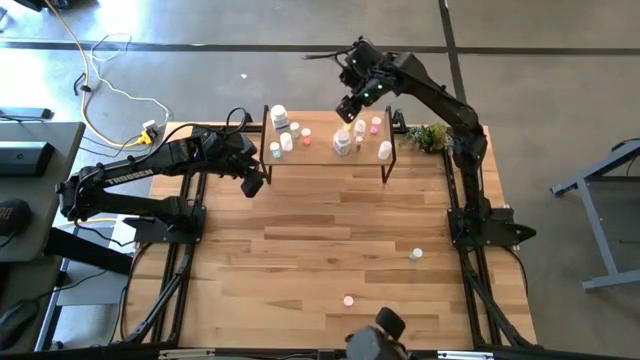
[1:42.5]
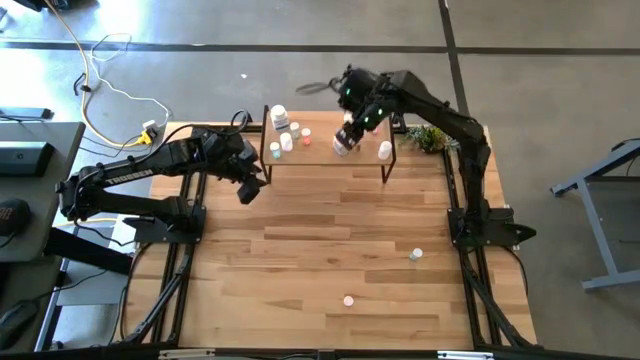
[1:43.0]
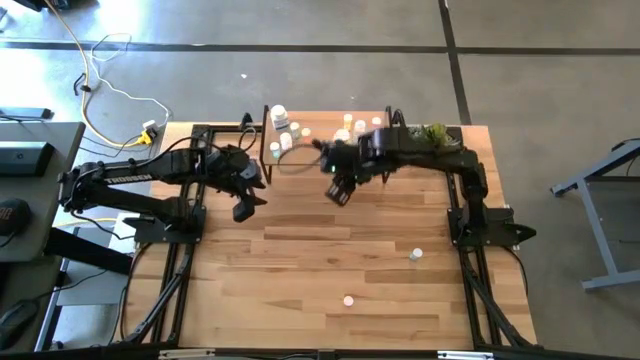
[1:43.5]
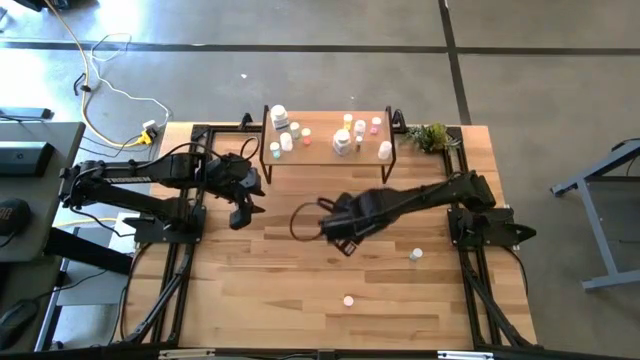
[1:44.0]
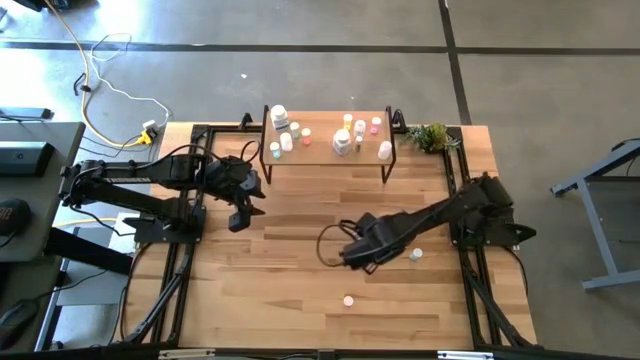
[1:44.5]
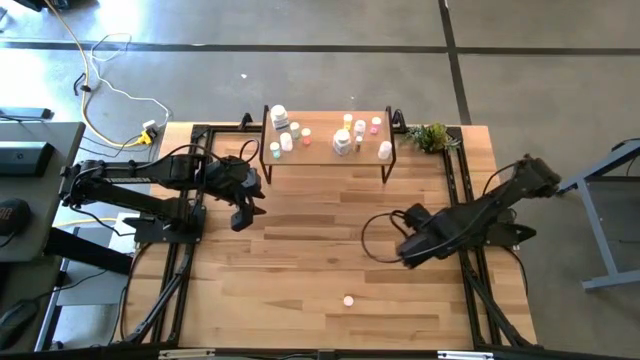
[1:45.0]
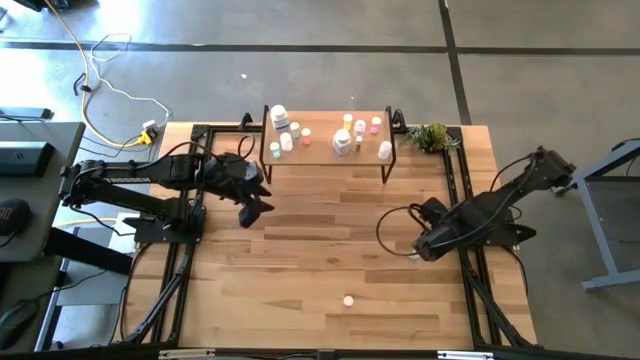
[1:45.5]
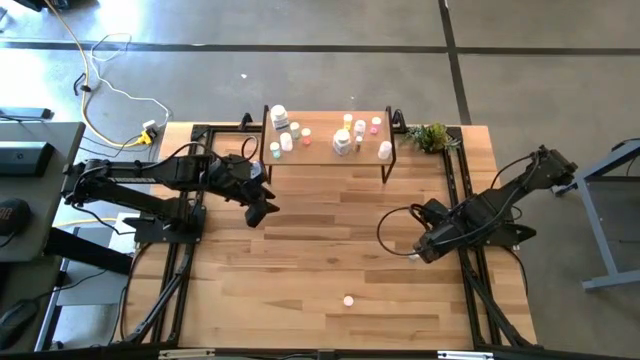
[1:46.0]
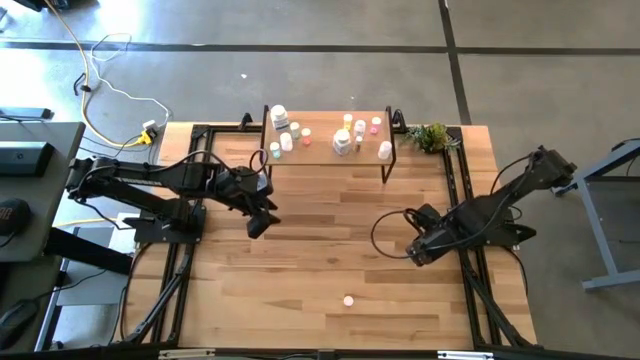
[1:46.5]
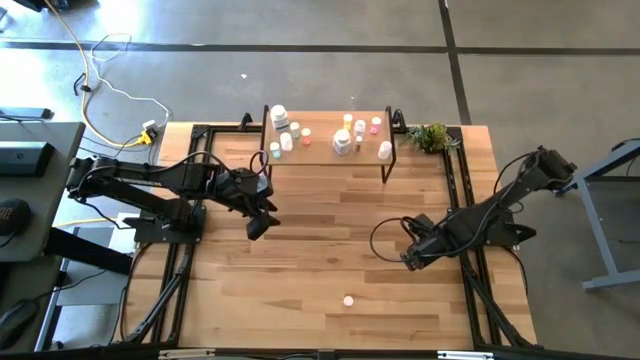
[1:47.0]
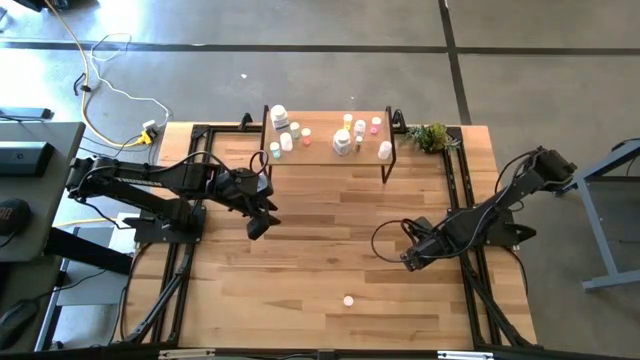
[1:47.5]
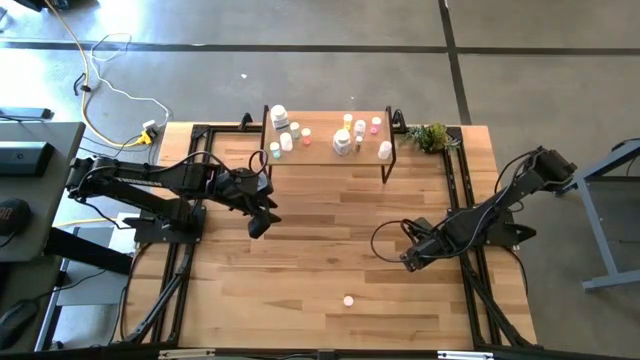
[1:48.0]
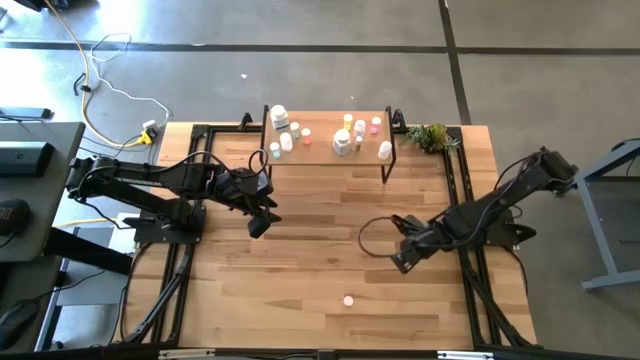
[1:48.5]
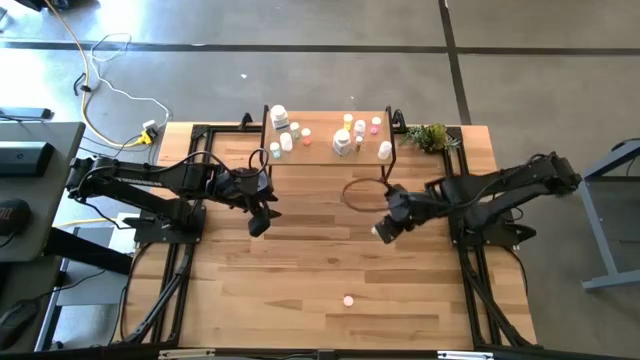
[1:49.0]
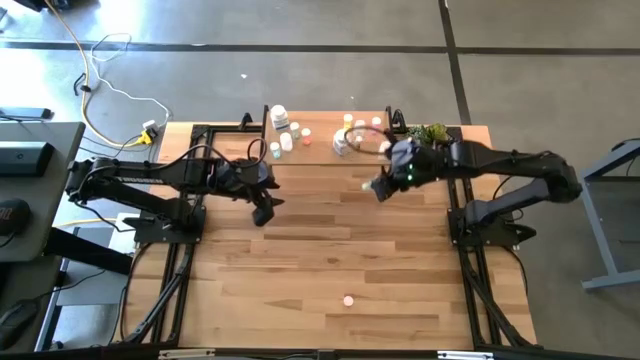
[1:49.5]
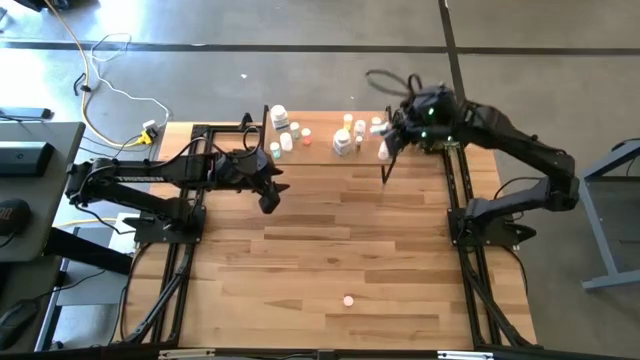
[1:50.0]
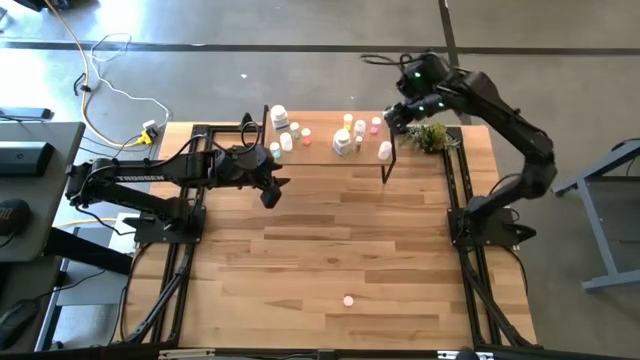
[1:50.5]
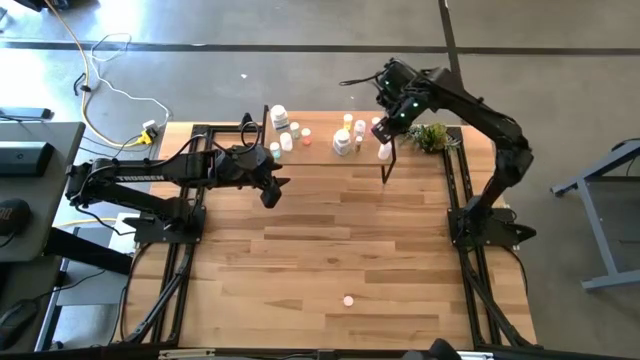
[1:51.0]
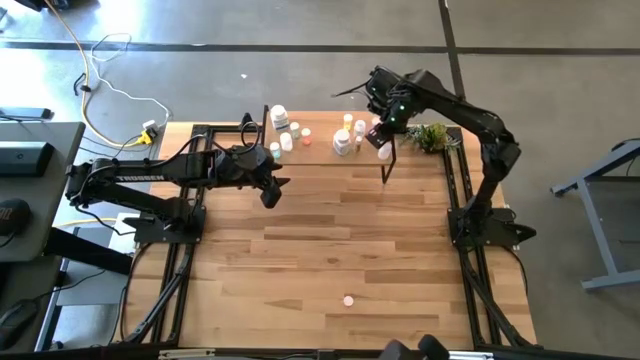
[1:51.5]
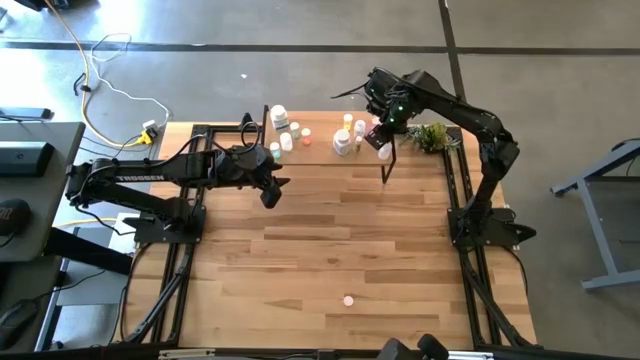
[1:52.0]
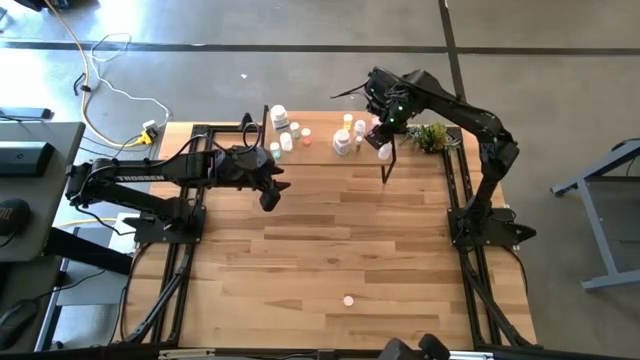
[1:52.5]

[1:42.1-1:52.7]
Task: Pick and place medicine bottles onto shelf by color
Put the blue pill bottle on the shelf

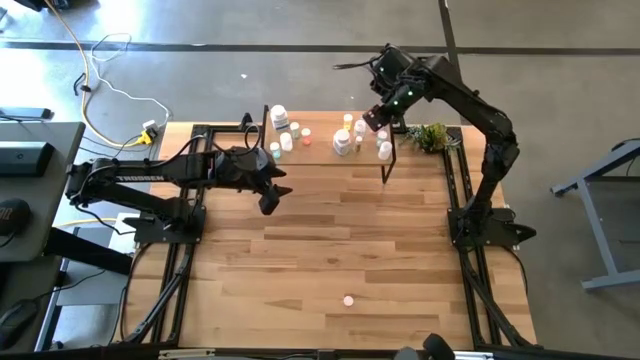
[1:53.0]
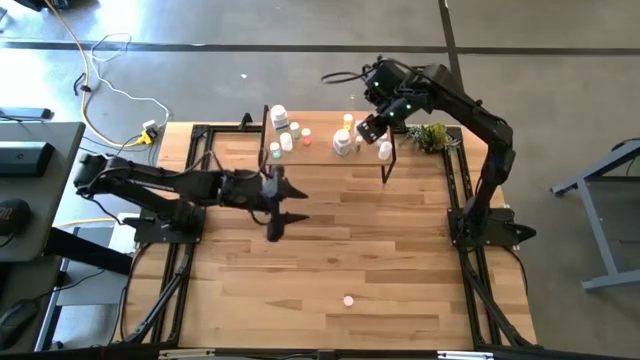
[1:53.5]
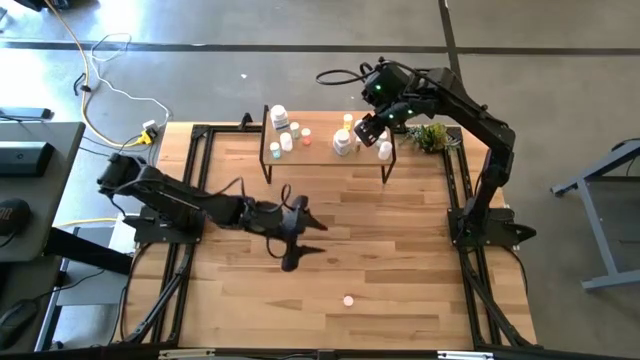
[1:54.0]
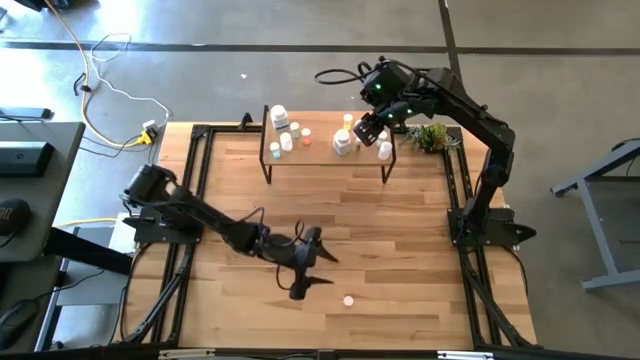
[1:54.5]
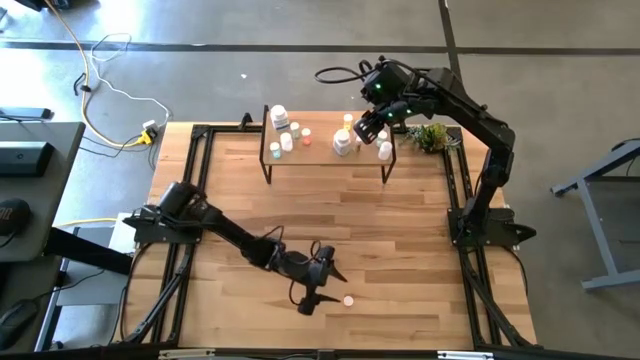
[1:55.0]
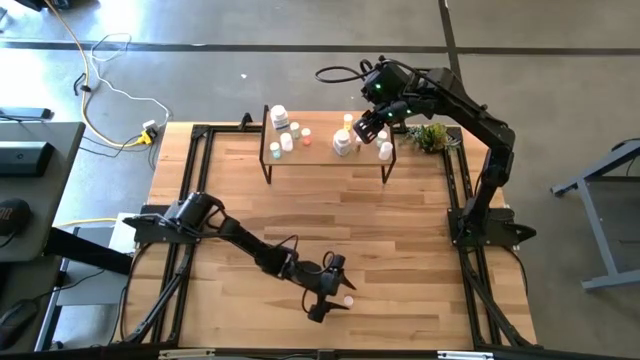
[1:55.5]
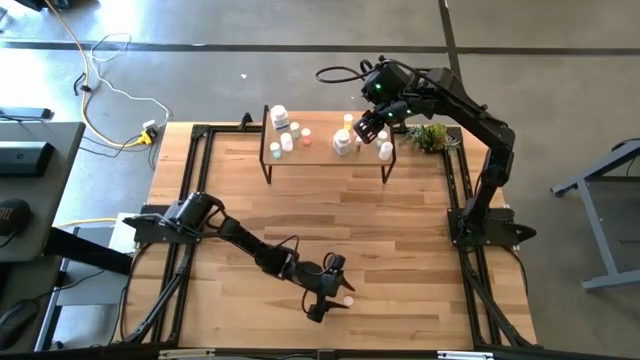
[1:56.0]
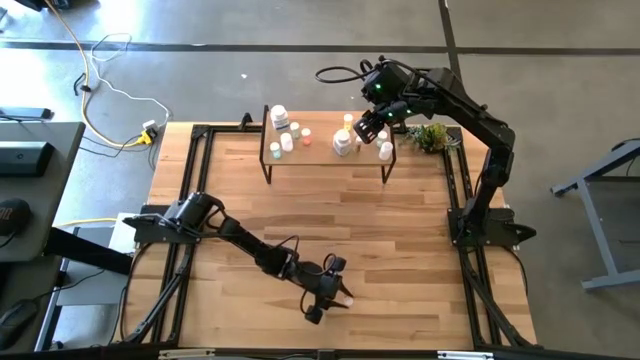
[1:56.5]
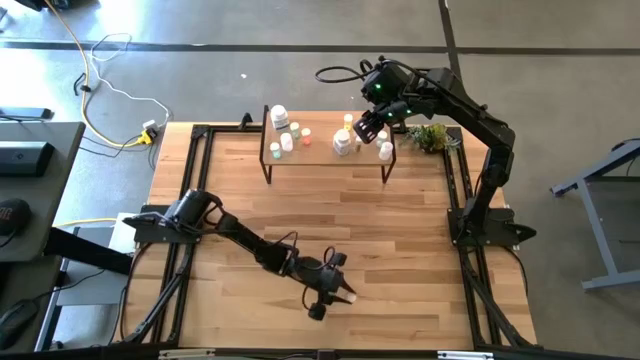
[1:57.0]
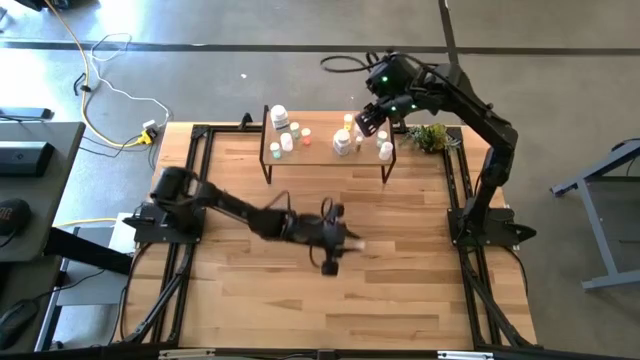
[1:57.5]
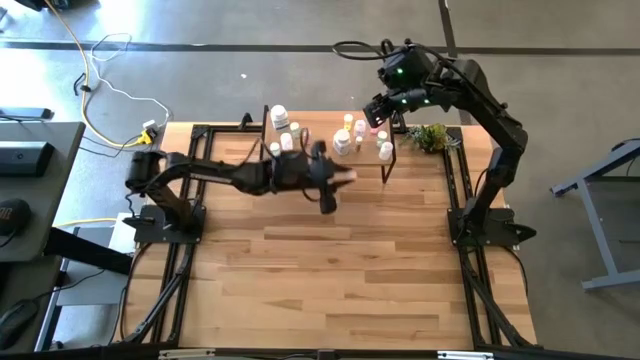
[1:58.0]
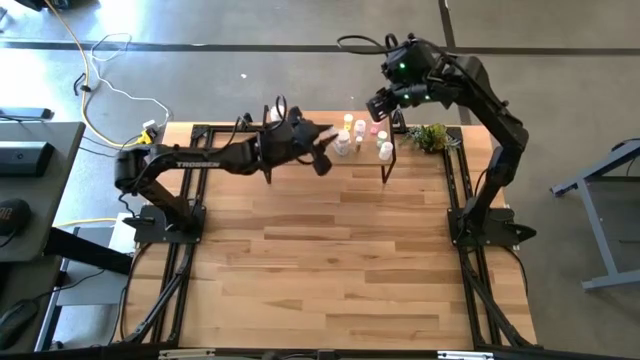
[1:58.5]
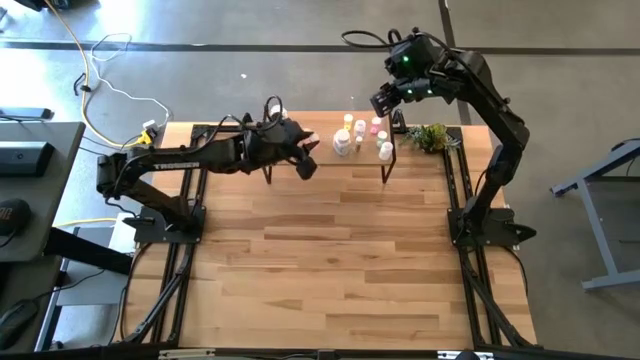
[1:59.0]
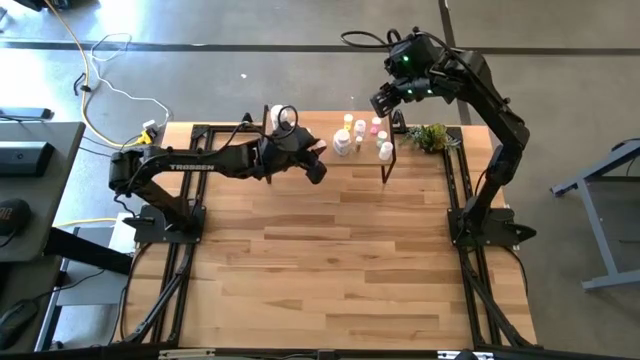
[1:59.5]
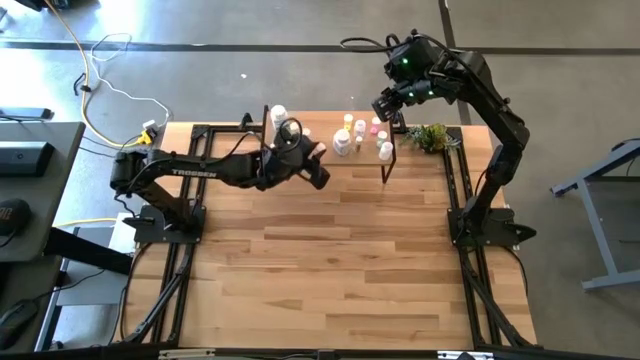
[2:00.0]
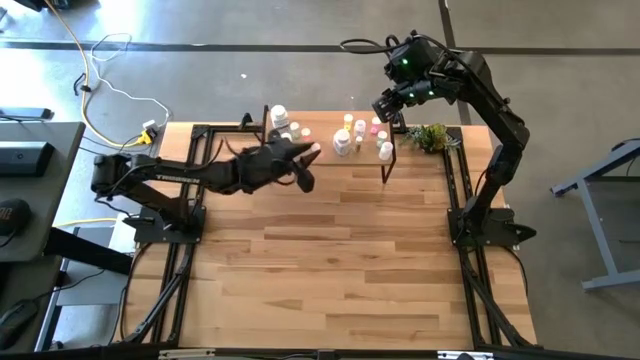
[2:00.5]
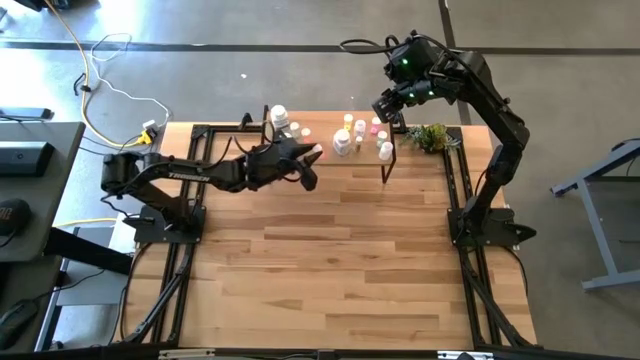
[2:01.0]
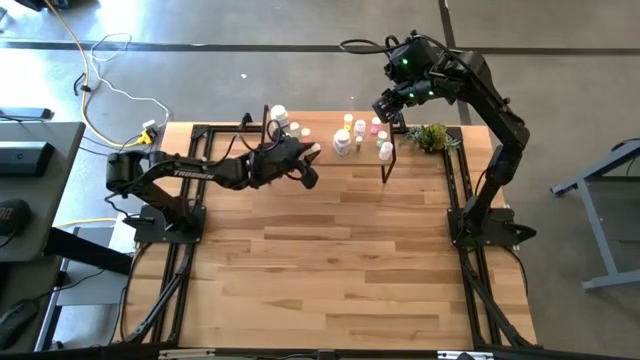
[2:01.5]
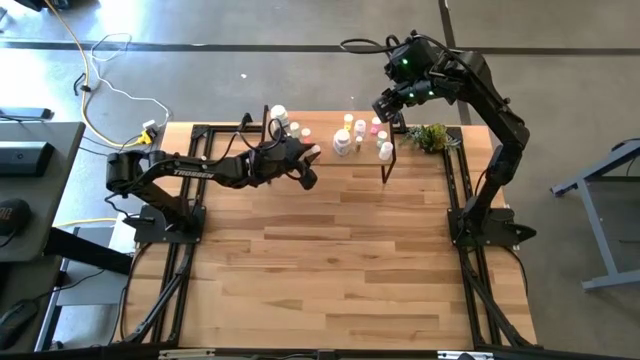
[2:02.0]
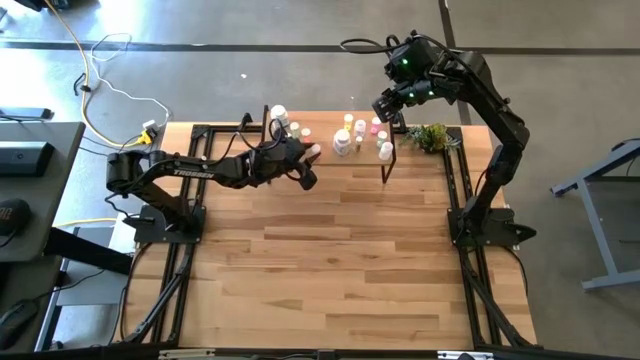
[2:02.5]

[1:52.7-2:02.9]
Put the pink pill bottle on the shelf

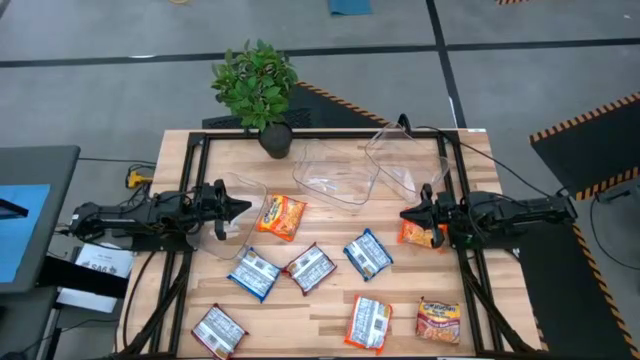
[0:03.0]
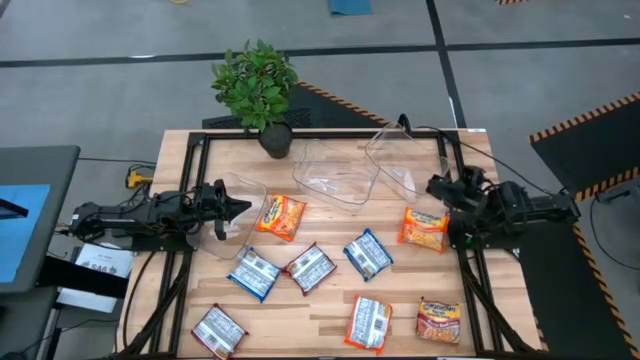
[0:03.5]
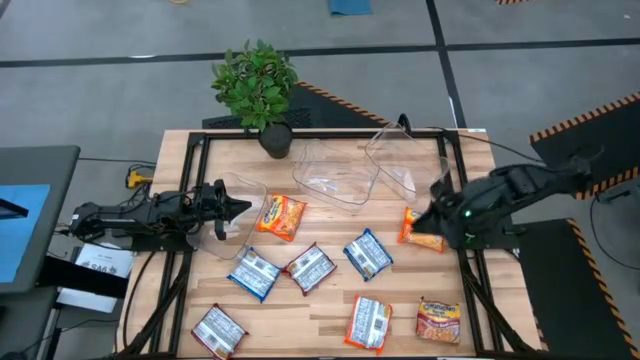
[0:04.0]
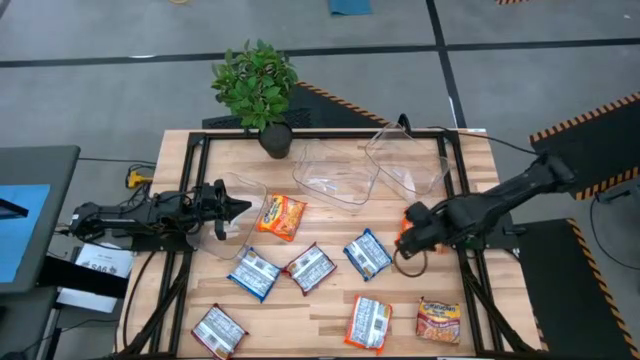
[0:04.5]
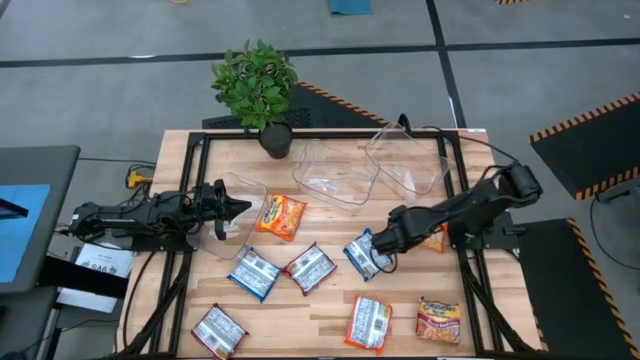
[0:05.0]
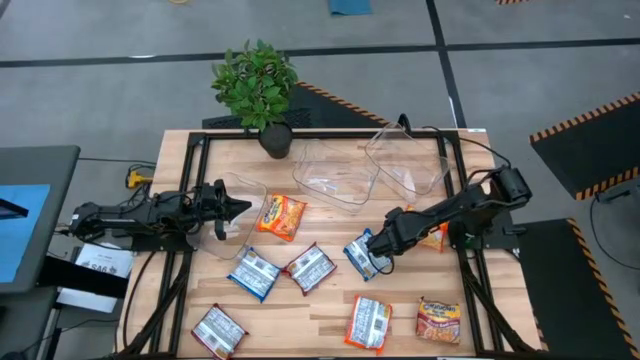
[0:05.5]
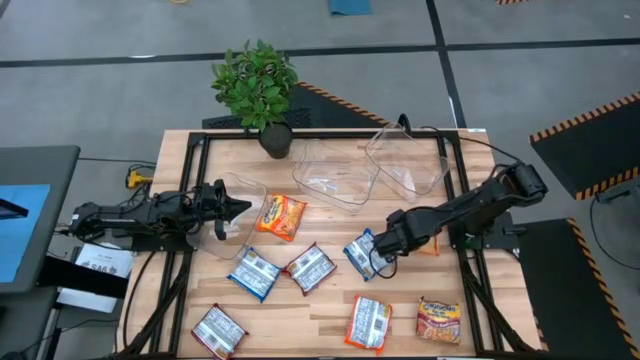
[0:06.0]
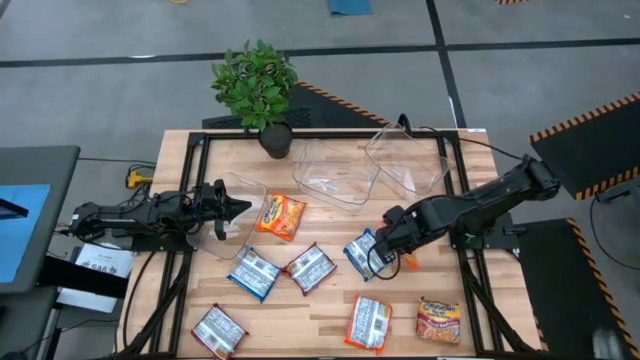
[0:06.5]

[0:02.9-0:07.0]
Task: Sort Maruchan noodles
Put the top right orange noodle pack into the right transparent bin
